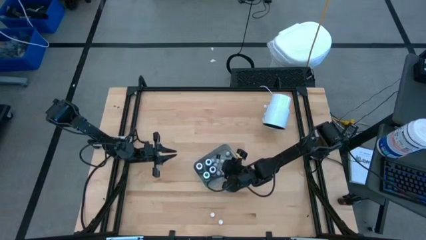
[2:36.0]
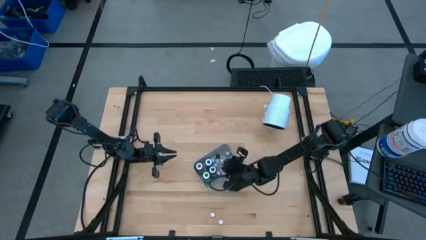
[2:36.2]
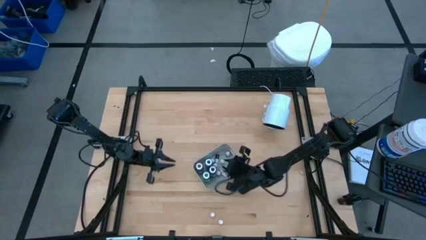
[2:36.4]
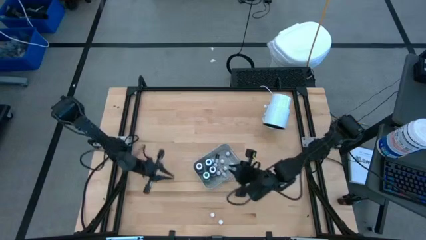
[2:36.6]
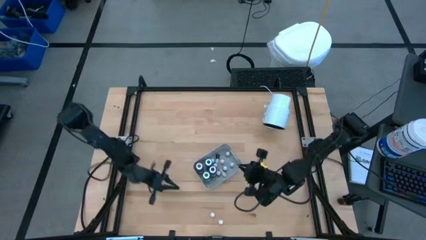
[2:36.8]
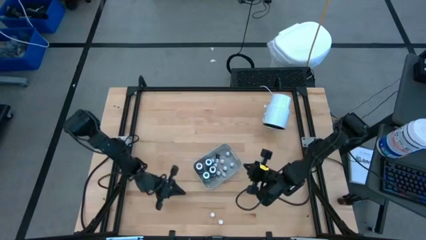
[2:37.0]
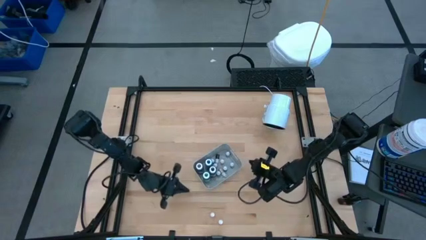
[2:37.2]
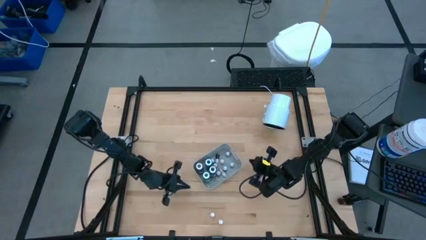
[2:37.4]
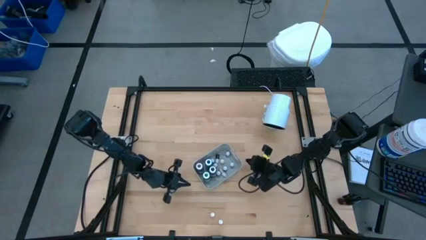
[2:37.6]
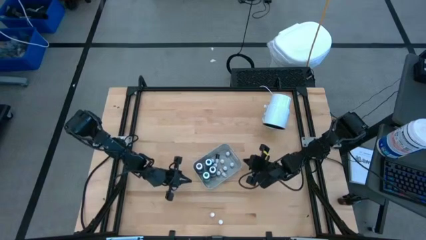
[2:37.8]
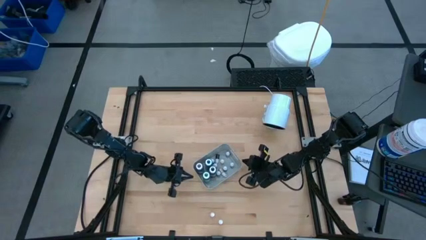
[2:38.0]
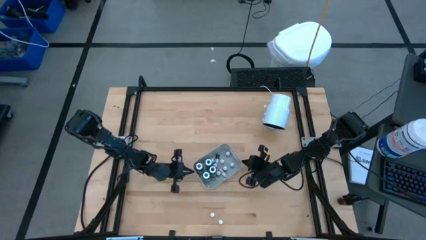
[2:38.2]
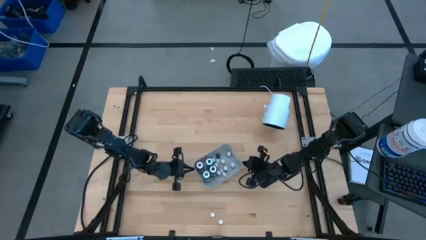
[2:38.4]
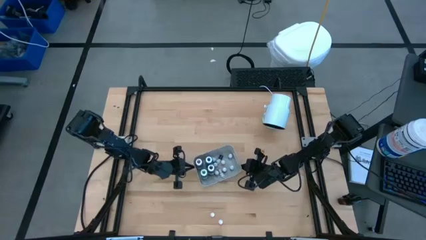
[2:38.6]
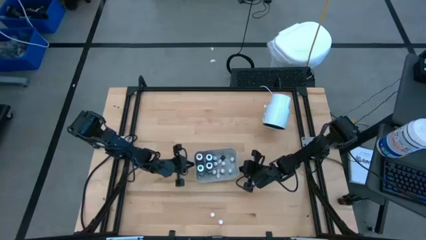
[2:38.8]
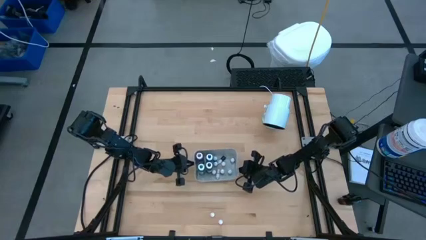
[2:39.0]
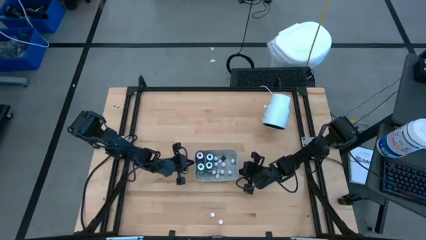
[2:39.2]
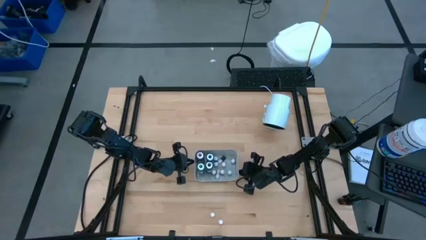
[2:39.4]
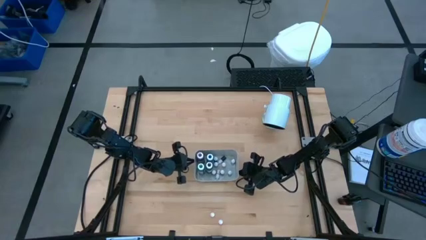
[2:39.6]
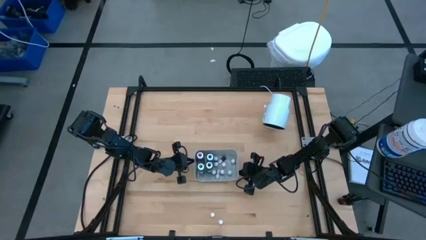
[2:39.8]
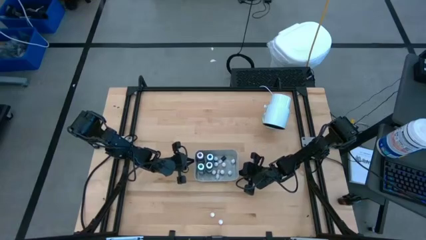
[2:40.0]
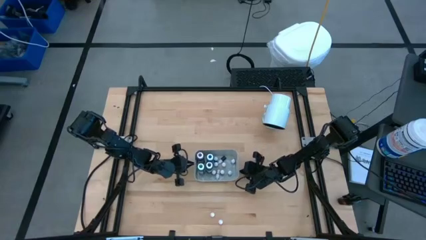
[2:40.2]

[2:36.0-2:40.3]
Task: Pick & Place food coloring
Adjust the gray bin

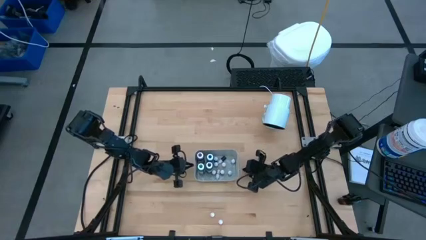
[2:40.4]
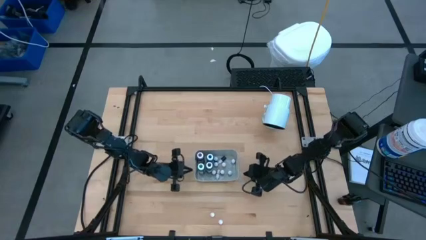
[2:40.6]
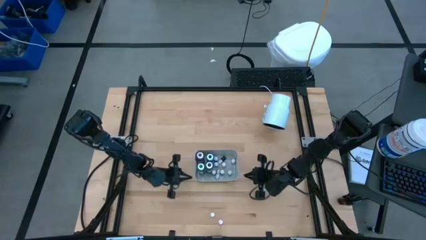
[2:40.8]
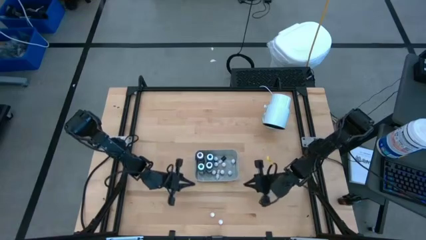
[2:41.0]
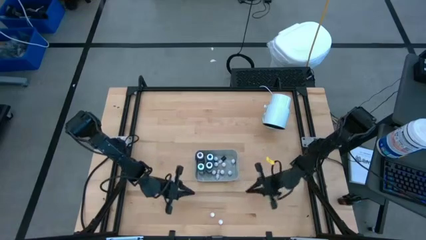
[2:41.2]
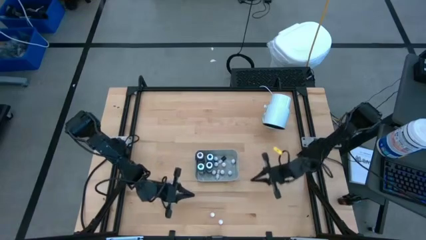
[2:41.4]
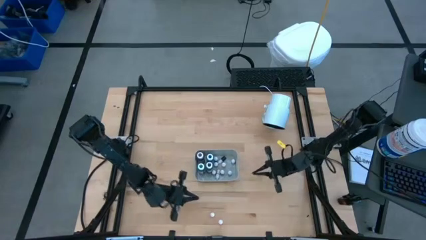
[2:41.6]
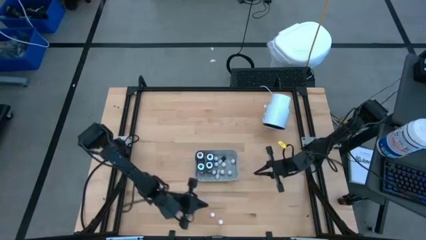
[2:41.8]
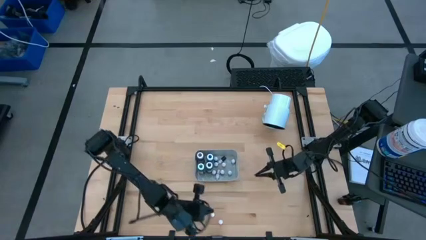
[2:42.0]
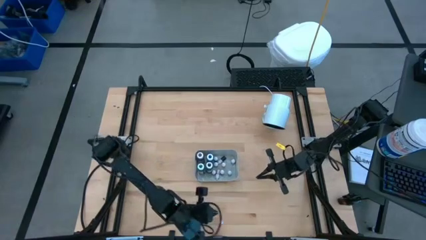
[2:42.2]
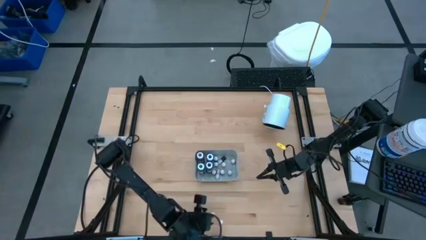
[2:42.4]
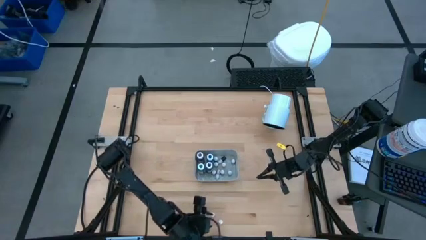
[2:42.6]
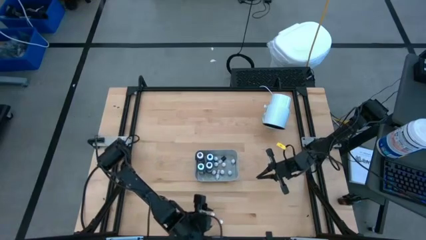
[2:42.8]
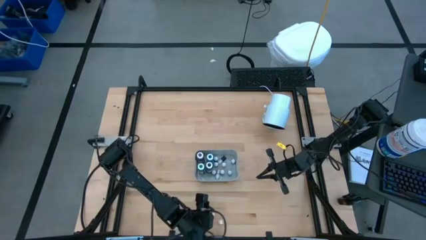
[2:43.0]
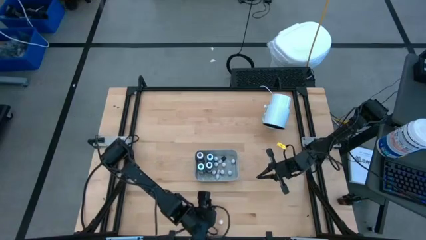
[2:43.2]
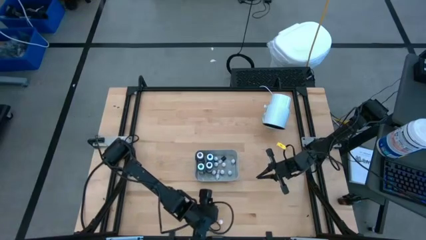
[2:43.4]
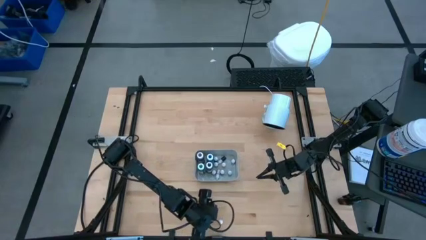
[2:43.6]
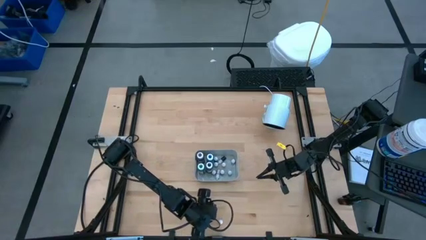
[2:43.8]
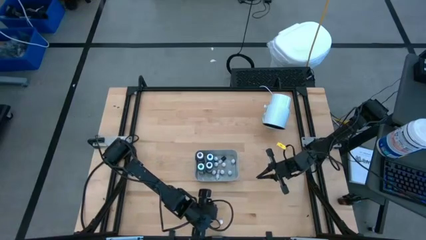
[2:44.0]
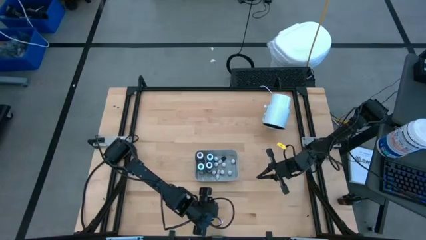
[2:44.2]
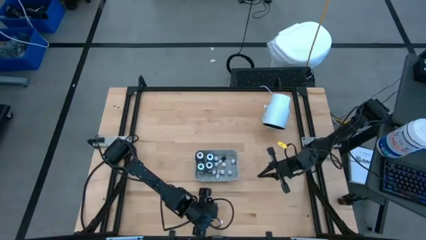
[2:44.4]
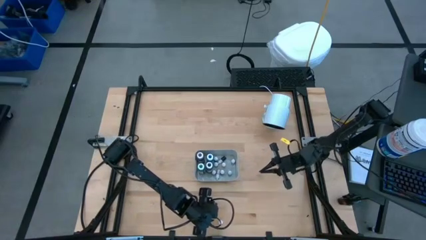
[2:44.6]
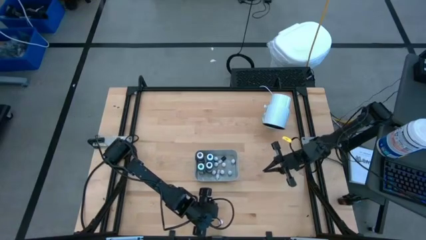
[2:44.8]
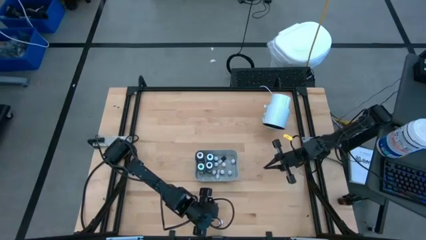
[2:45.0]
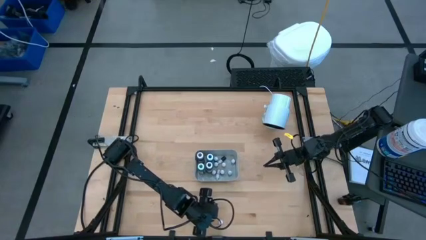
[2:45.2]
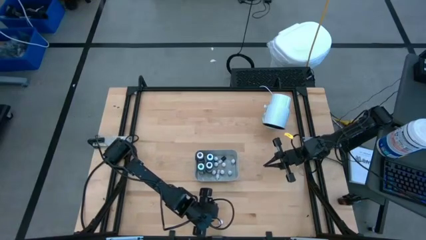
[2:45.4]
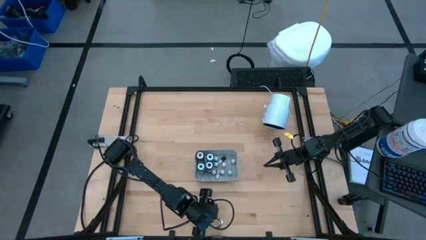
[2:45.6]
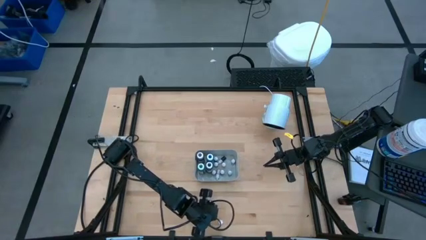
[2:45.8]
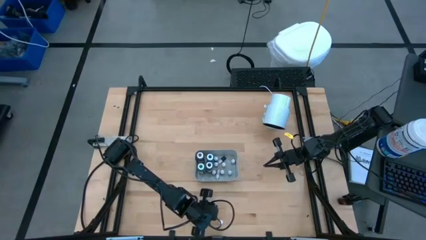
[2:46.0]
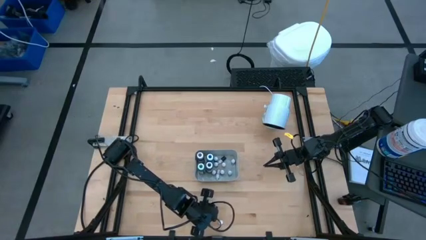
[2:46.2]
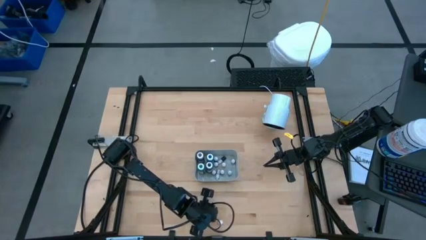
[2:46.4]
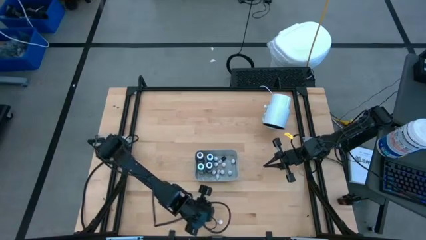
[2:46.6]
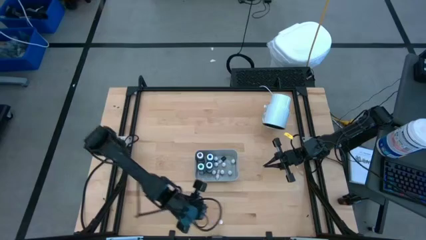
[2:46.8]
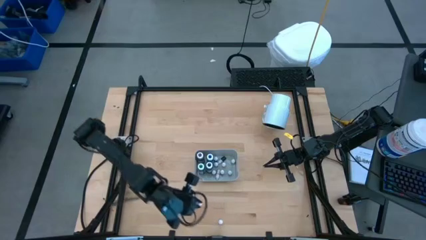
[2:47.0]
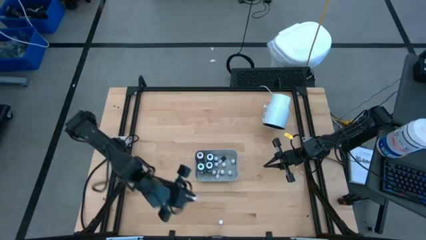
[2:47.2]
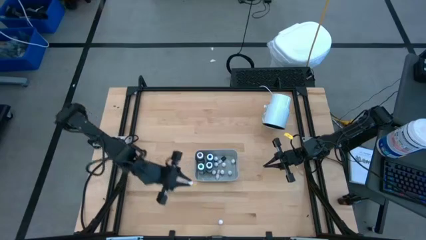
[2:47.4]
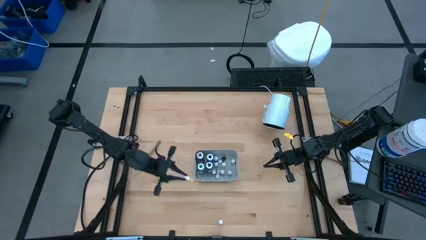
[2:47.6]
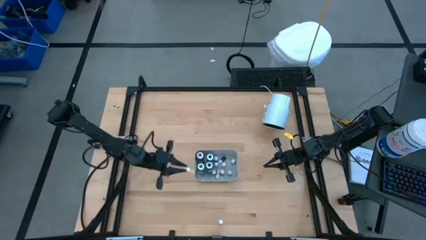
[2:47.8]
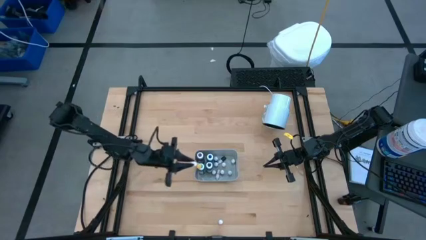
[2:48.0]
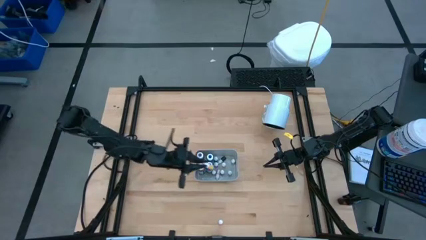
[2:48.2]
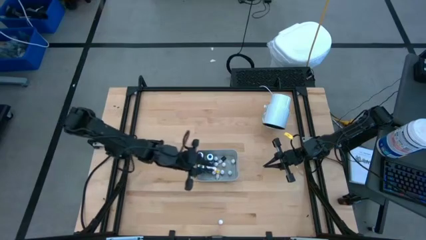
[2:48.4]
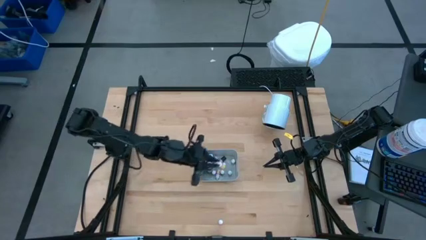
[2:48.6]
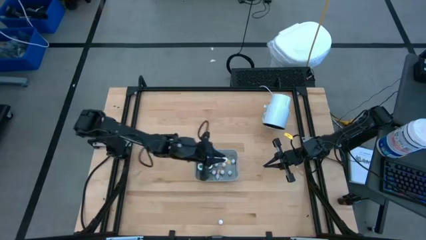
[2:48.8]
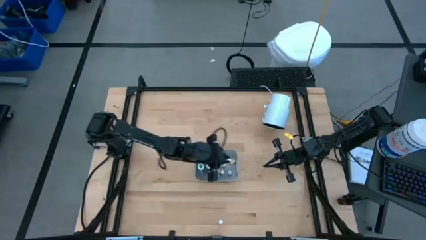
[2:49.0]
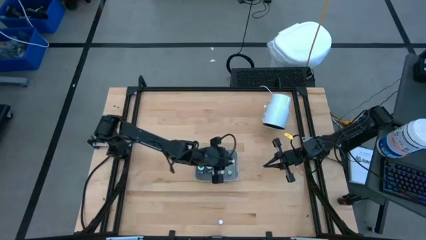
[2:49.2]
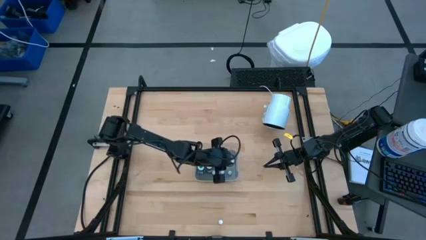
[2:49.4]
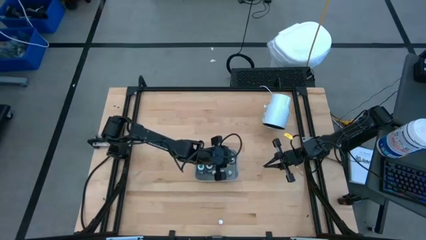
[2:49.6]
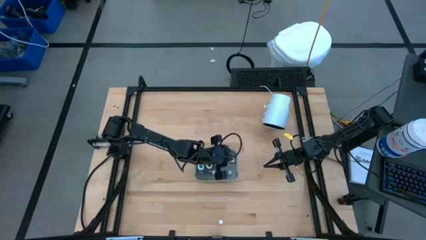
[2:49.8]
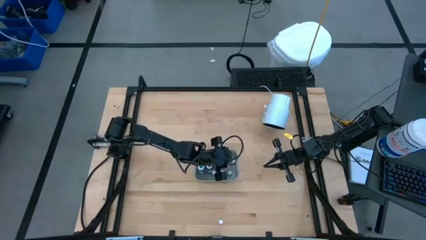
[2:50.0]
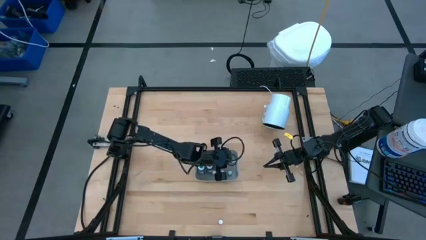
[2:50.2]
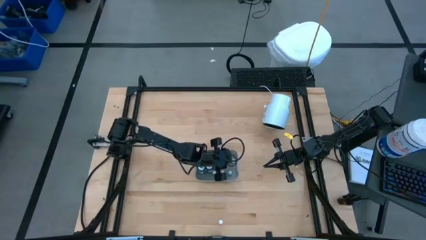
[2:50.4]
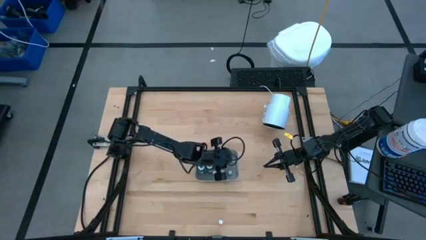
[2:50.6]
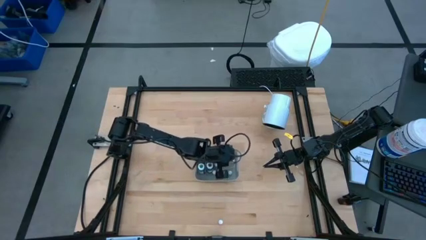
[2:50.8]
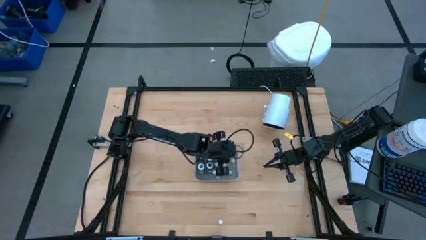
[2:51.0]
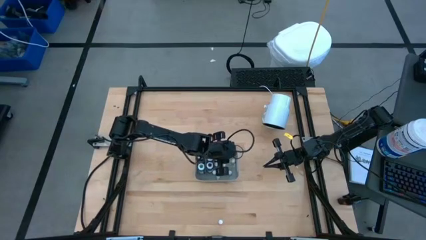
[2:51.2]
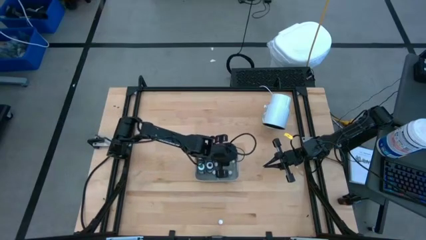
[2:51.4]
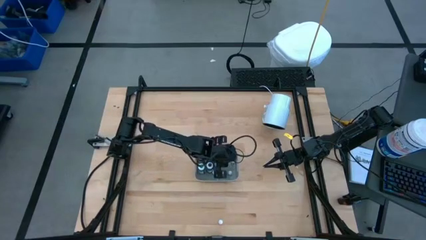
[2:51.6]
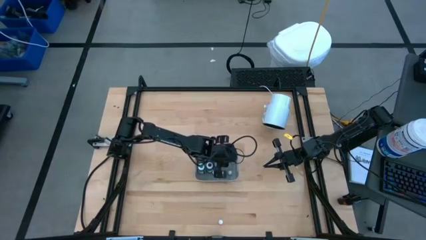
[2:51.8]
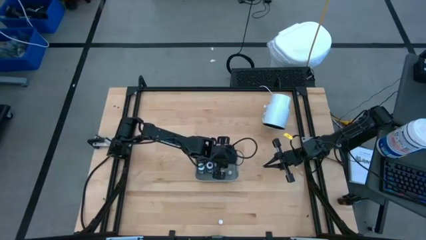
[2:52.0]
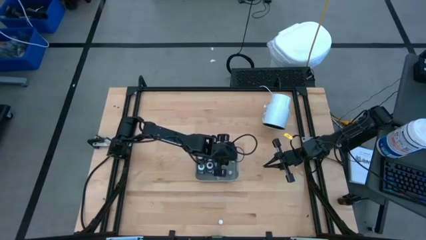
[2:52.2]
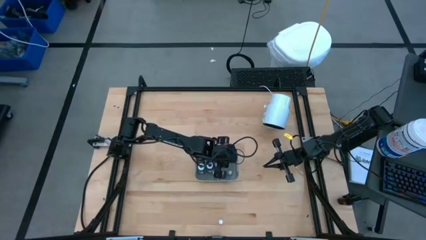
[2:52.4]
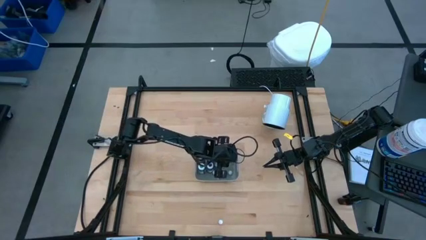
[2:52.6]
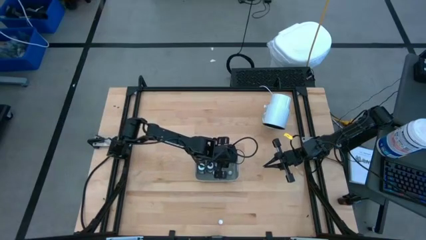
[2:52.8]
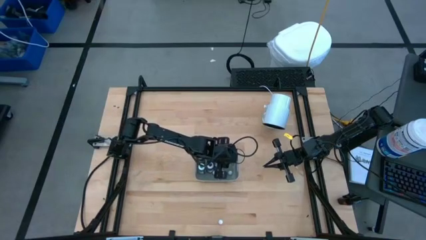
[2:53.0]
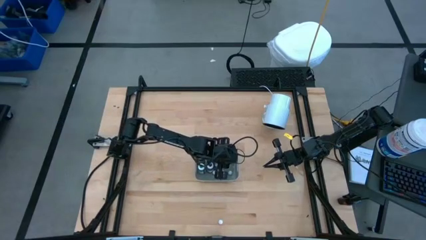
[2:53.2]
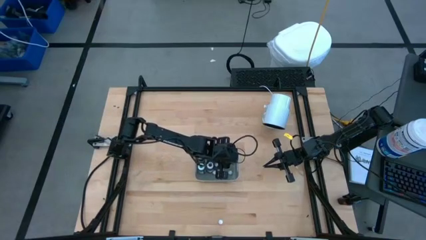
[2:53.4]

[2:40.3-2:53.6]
Put the small orange food coloring bottle into the gray bin
